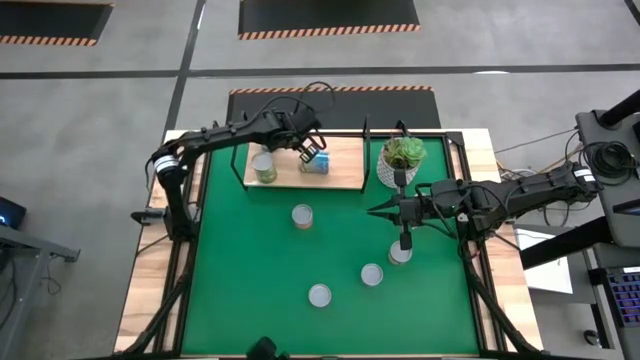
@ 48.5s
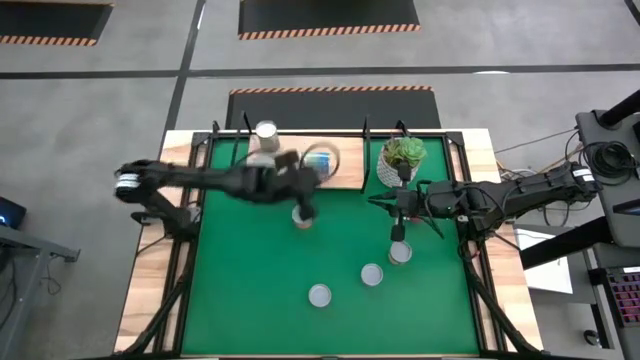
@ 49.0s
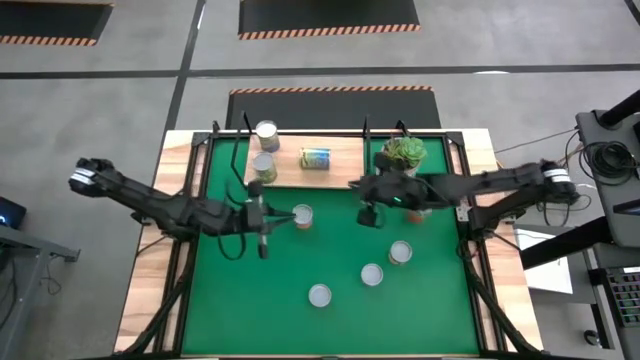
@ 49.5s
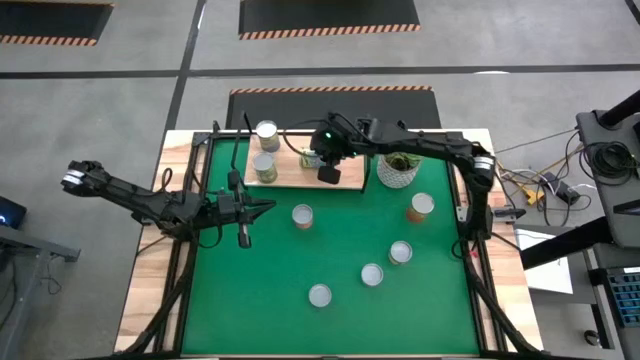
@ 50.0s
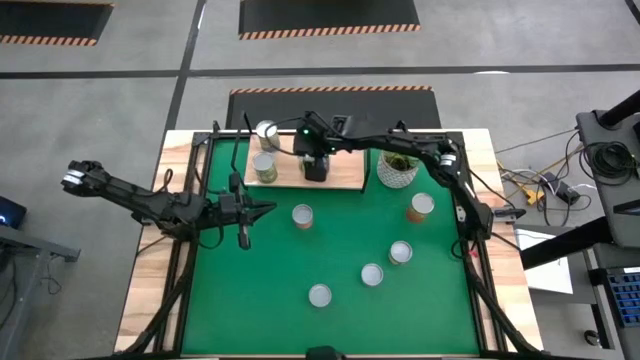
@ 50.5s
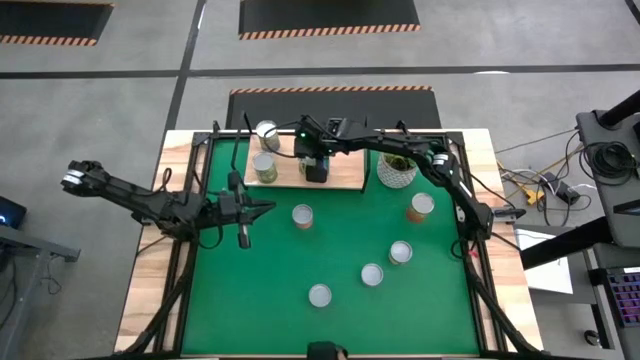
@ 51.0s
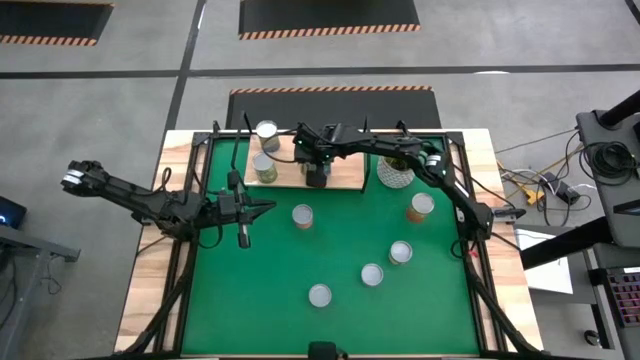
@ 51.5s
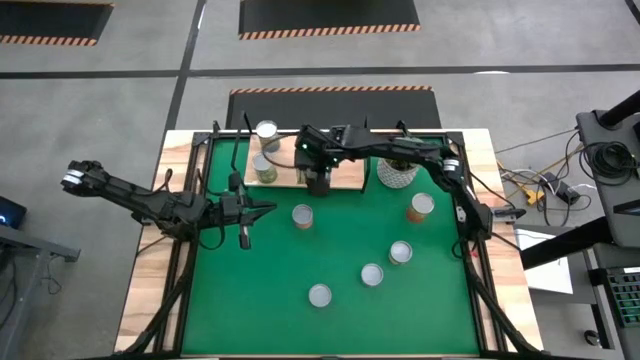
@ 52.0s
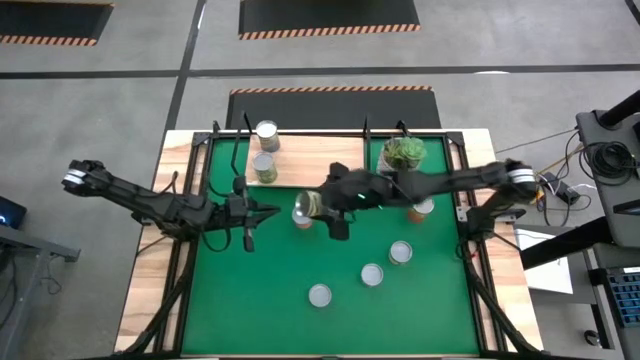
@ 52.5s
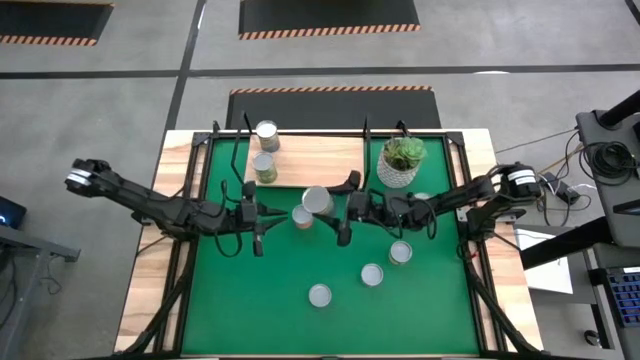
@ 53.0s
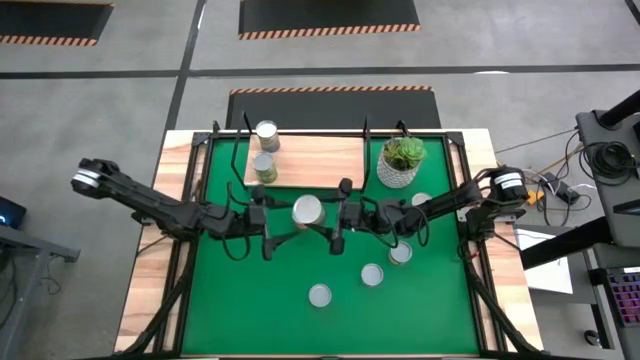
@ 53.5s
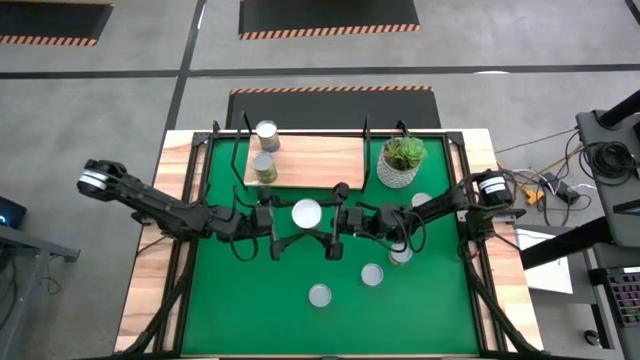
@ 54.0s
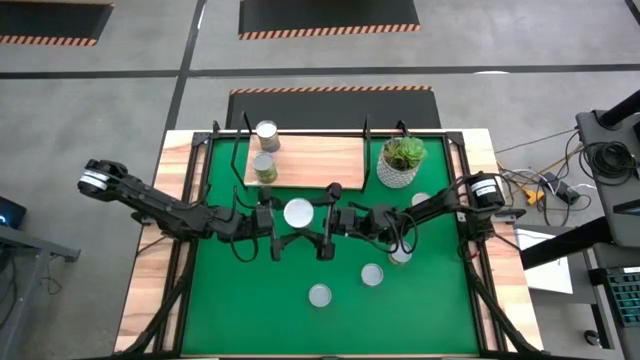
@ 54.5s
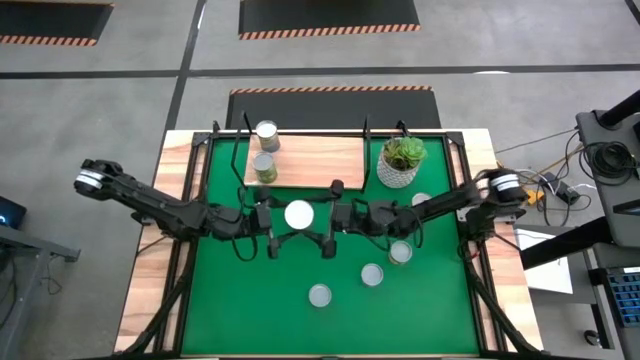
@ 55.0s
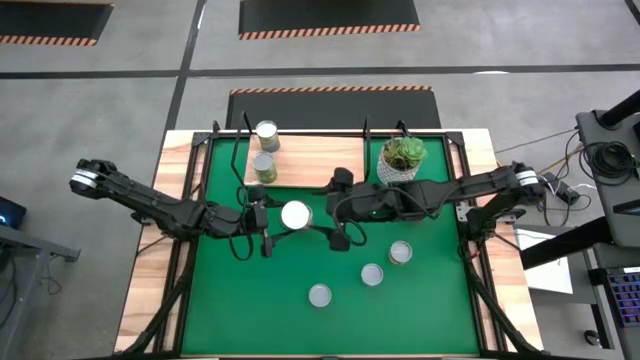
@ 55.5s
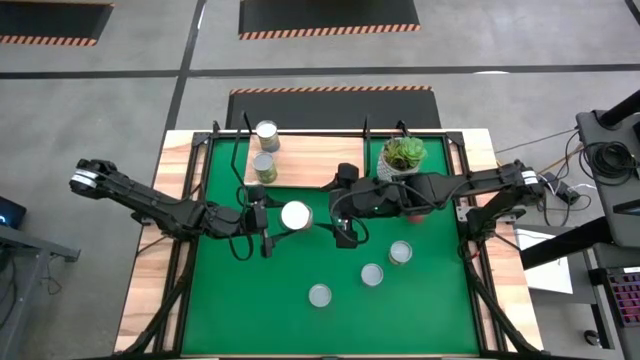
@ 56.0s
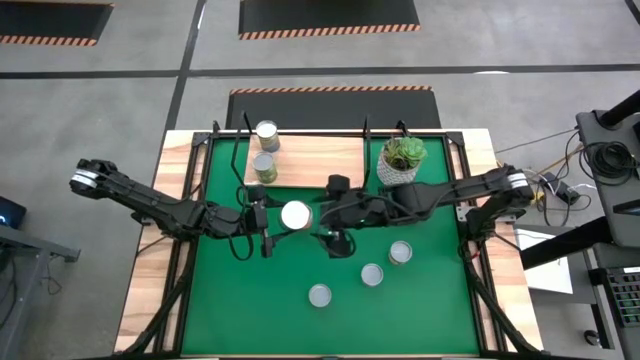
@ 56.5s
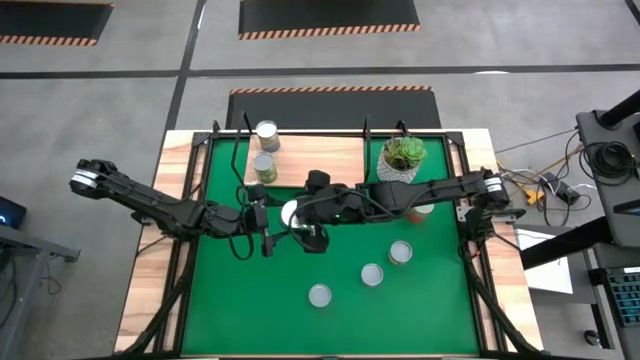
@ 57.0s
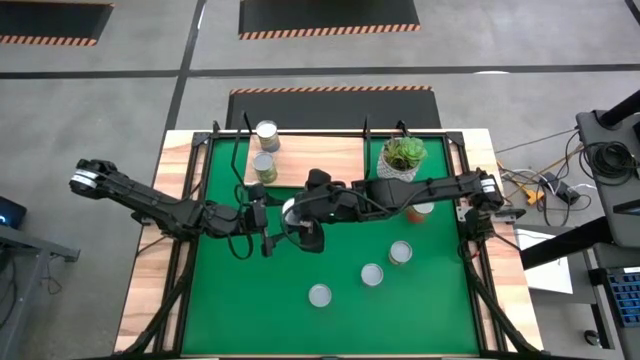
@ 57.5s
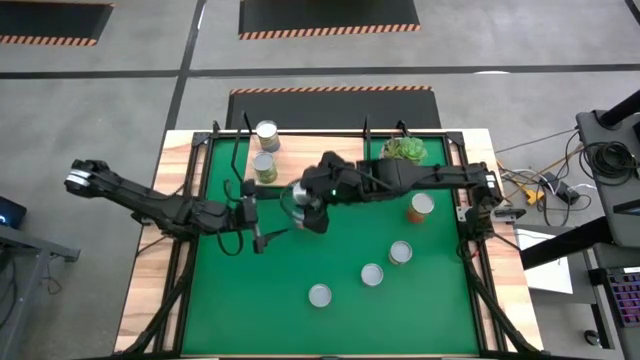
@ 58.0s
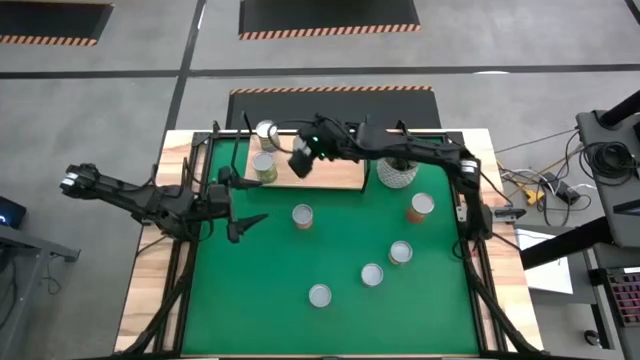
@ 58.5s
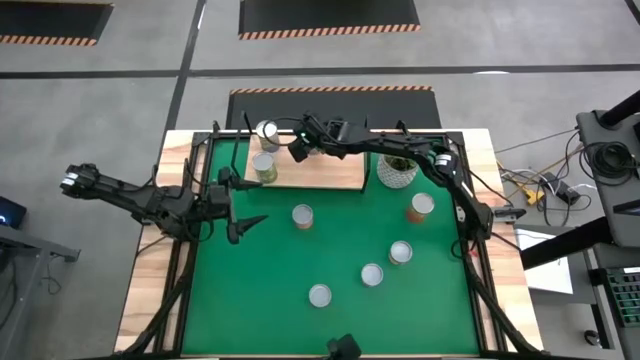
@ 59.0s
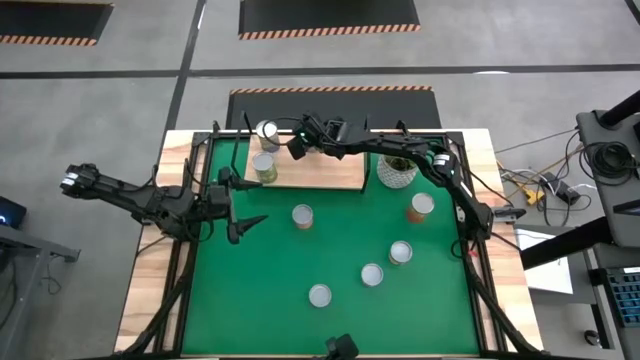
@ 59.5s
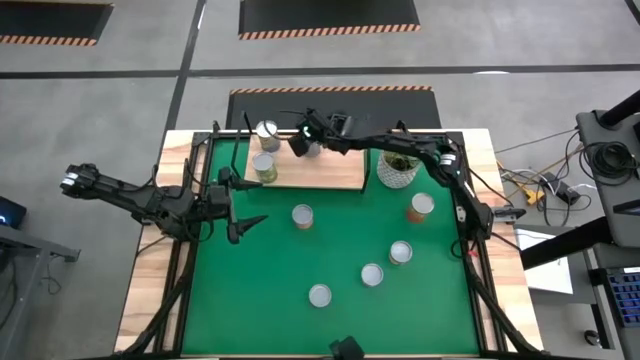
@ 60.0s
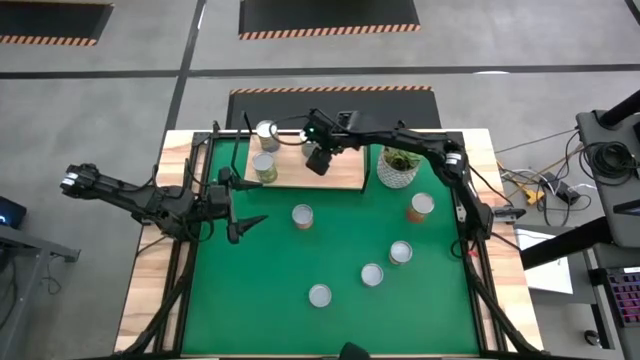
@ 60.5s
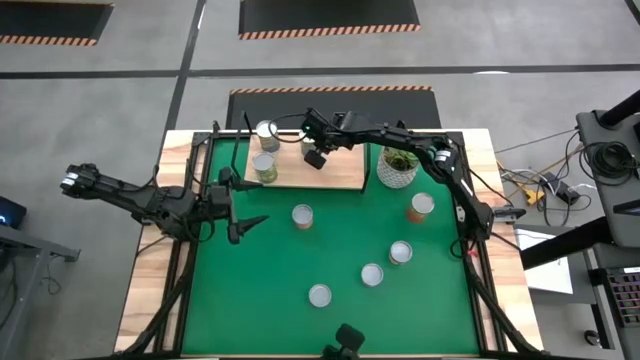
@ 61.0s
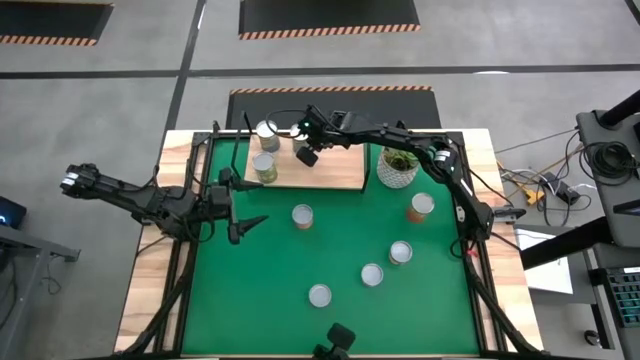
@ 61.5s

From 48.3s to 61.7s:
Task: Pick and place cans onto a shelf
Put the canned cherries on the shelf

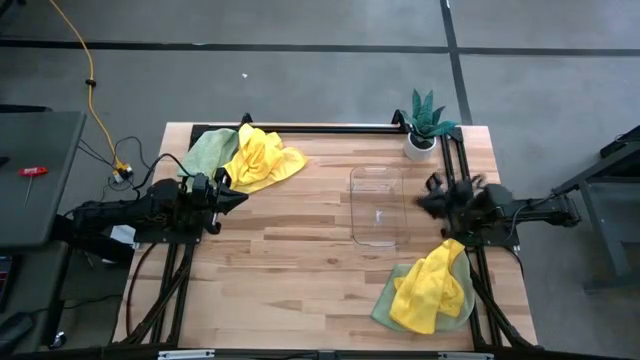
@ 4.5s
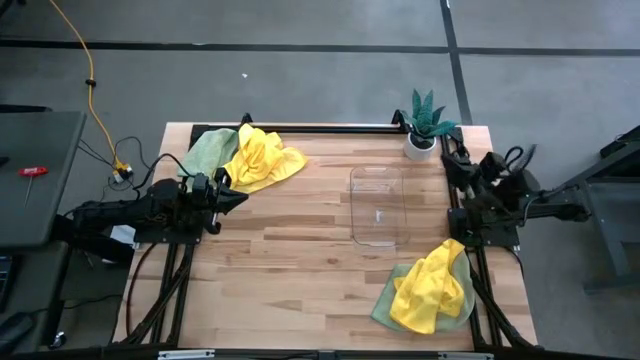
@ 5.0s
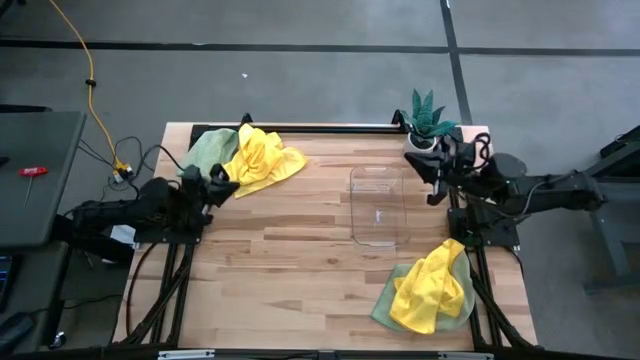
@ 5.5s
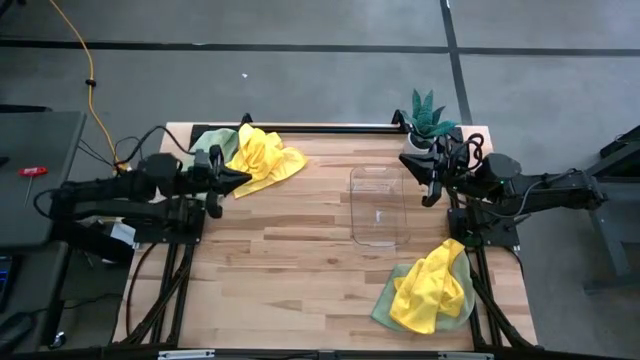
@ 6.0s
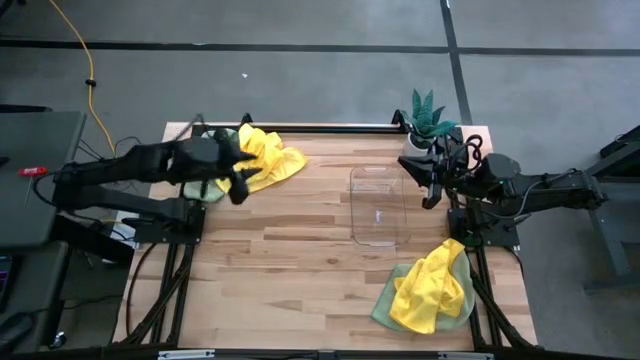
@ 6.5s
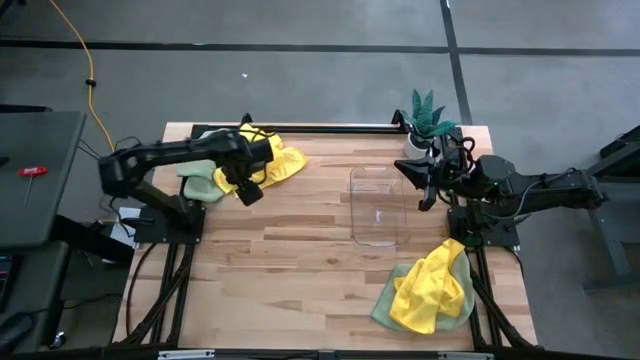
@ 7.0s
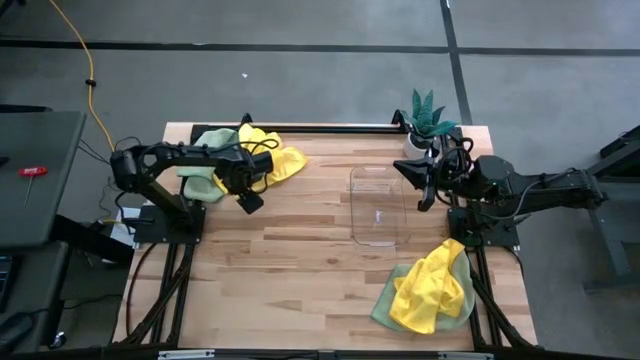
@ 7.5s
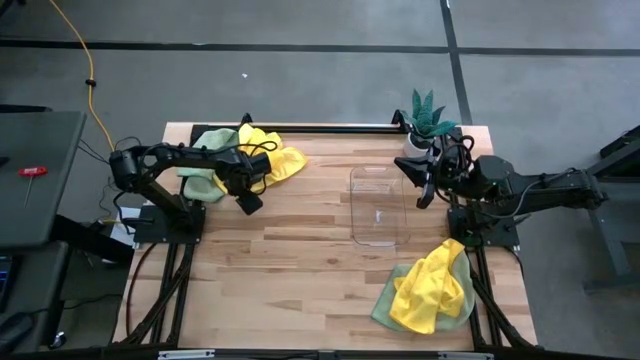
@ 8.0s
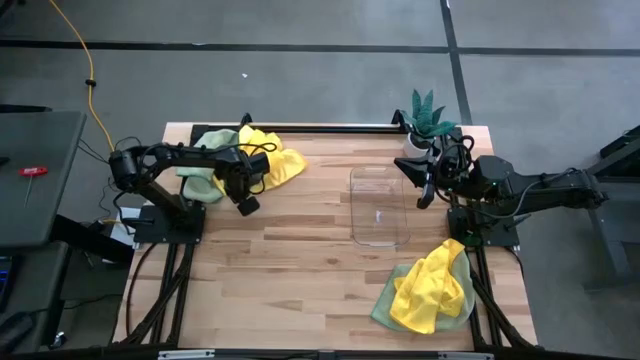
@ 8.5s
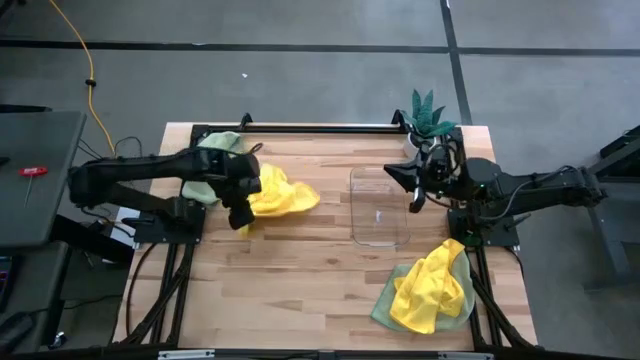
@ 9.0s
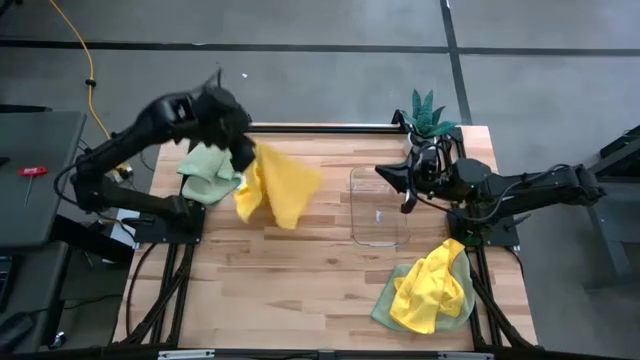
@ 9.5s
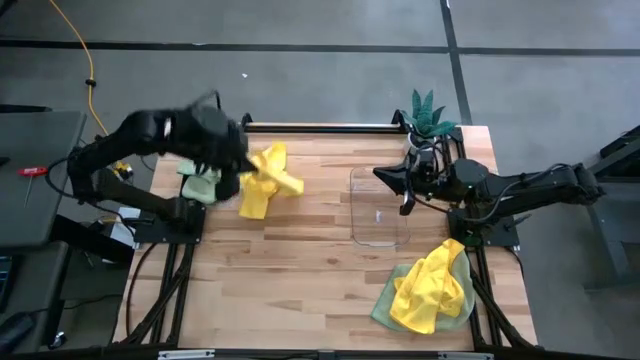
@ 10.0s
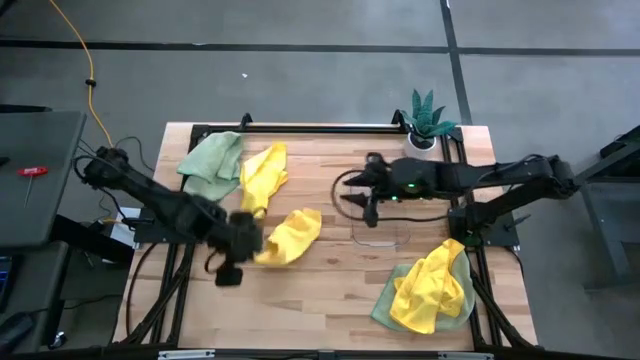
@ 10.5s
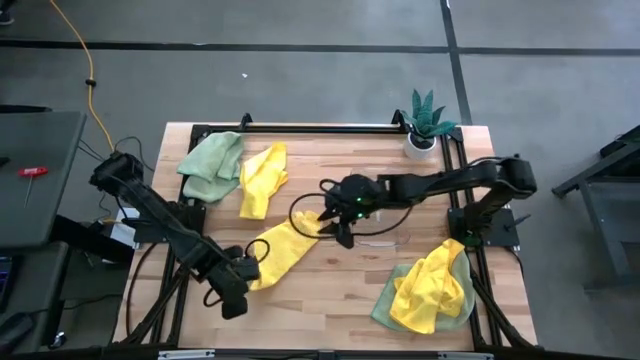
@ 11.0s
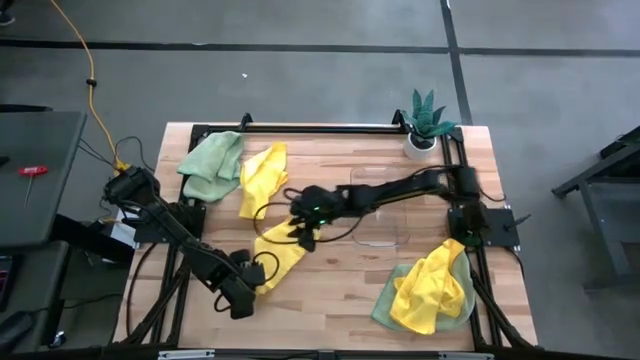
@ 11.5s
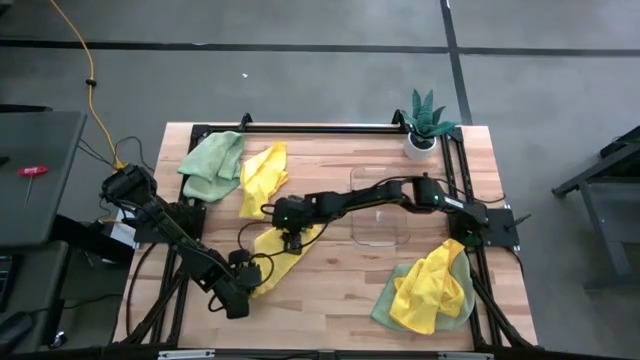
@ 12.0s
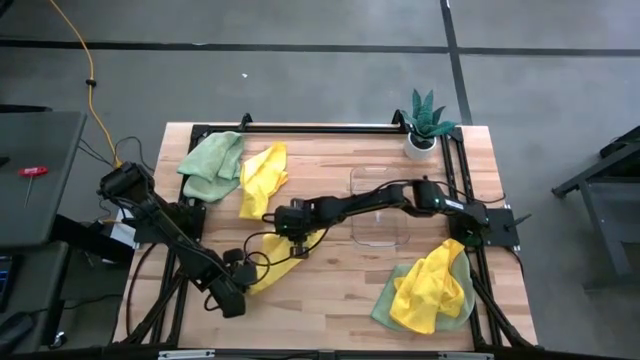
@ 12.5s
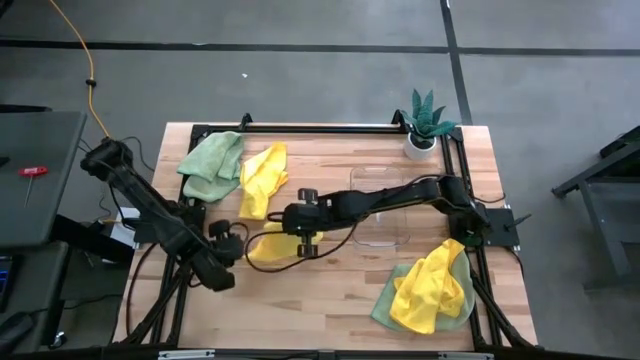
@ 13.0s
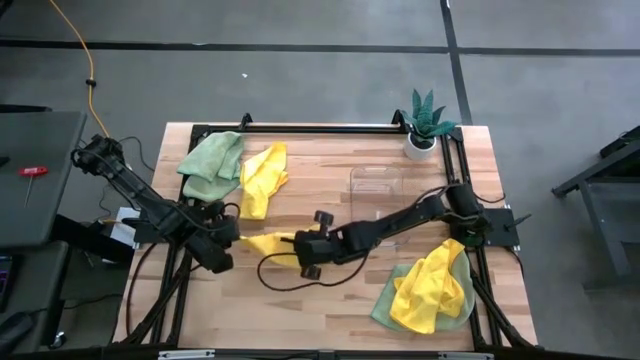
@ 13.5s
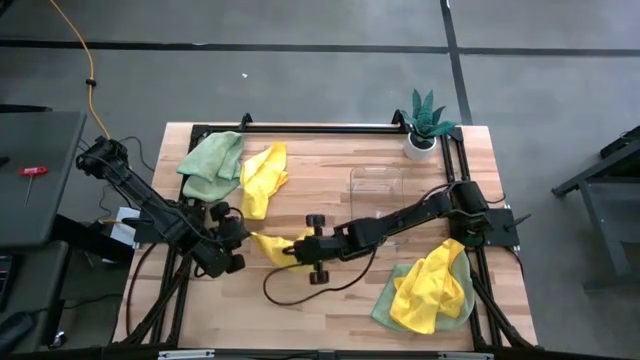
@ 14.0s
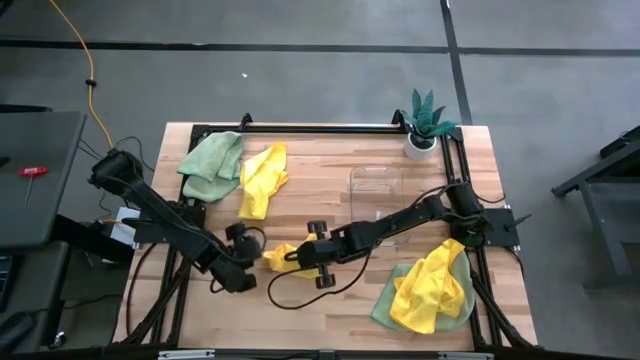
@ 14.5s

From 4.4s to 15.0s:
Task: Fold microfiber towels
Prepare the middle yellow microfiber towel
